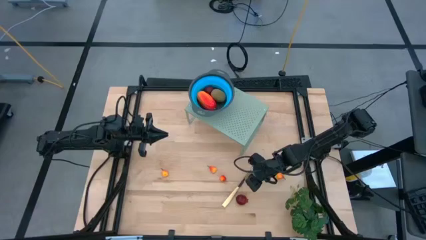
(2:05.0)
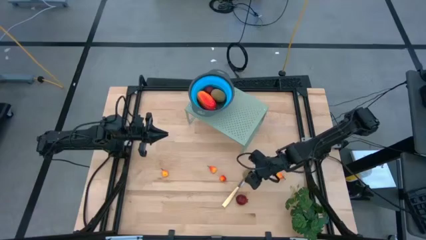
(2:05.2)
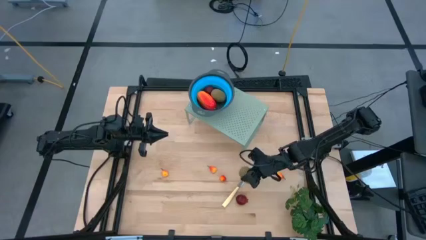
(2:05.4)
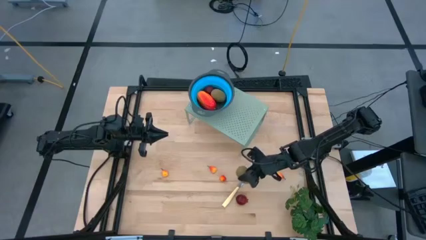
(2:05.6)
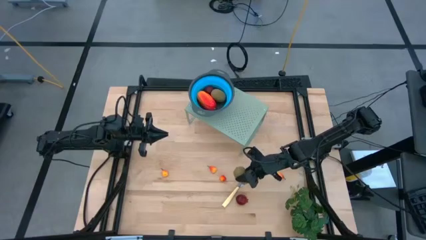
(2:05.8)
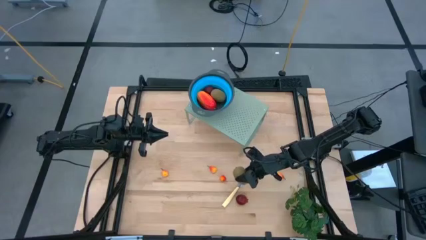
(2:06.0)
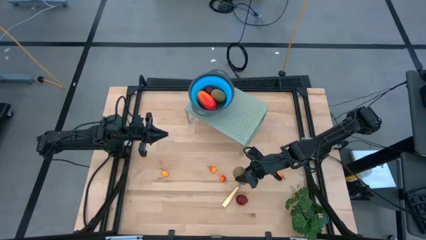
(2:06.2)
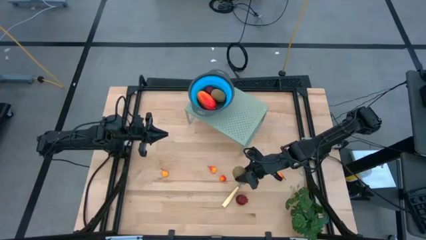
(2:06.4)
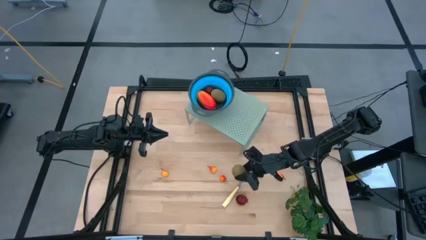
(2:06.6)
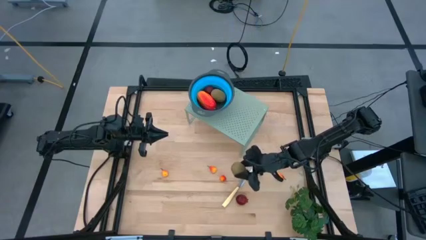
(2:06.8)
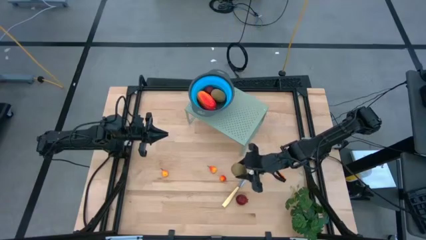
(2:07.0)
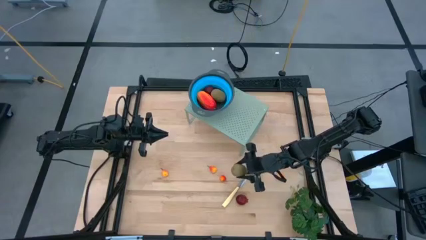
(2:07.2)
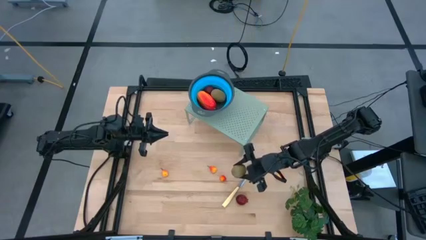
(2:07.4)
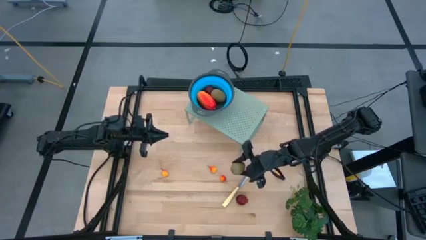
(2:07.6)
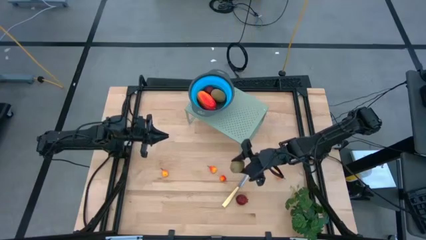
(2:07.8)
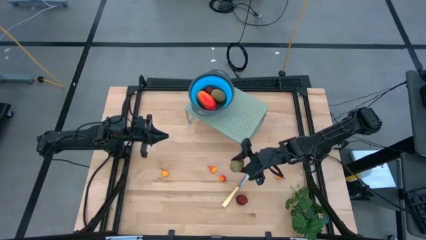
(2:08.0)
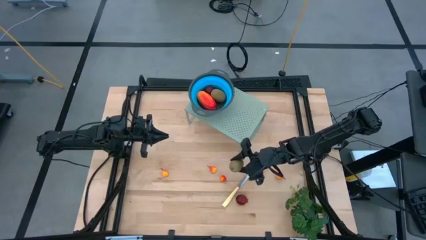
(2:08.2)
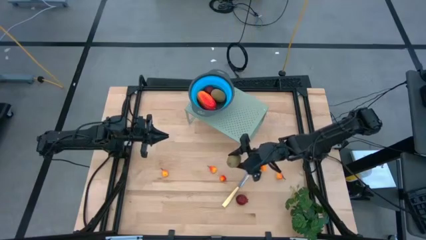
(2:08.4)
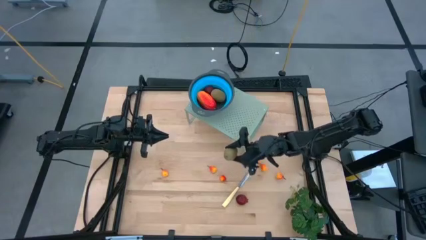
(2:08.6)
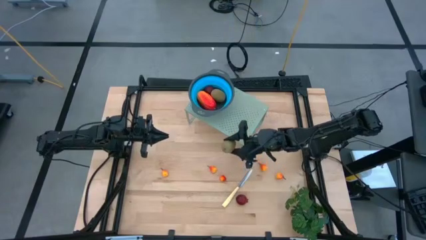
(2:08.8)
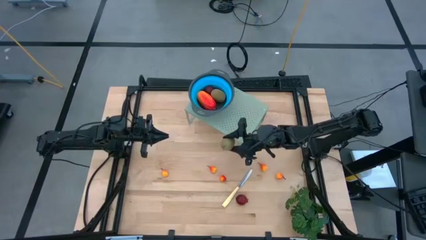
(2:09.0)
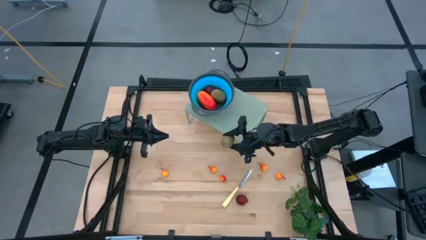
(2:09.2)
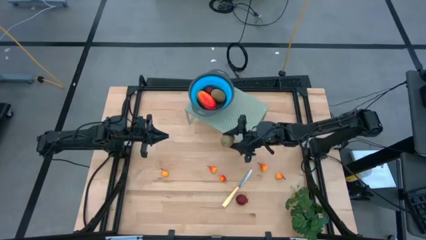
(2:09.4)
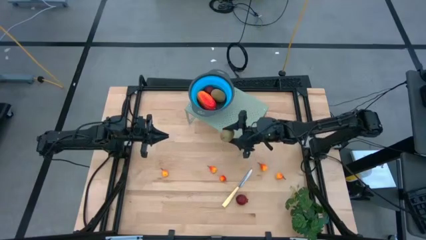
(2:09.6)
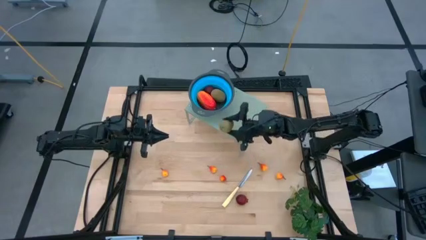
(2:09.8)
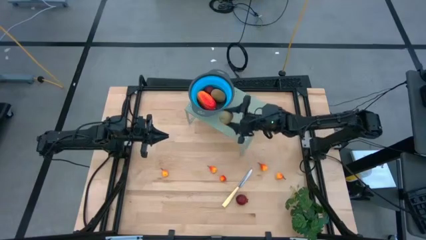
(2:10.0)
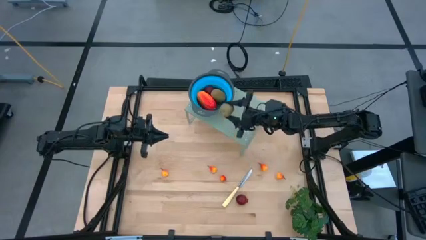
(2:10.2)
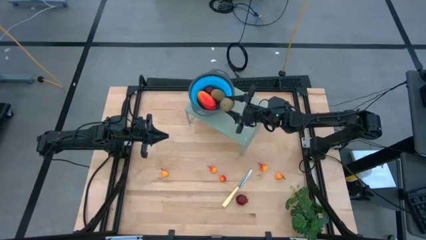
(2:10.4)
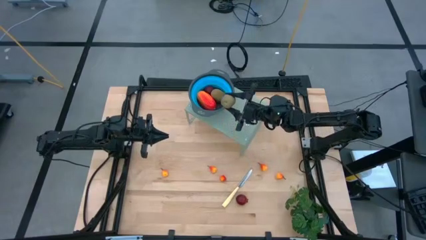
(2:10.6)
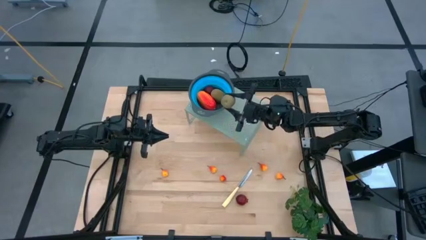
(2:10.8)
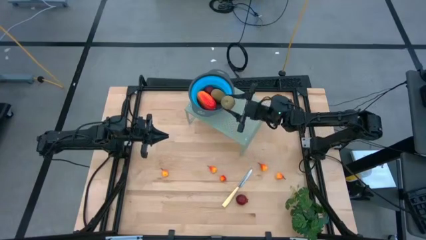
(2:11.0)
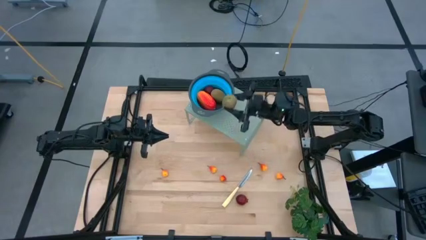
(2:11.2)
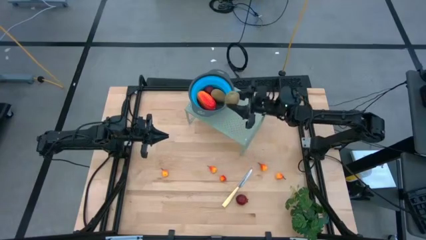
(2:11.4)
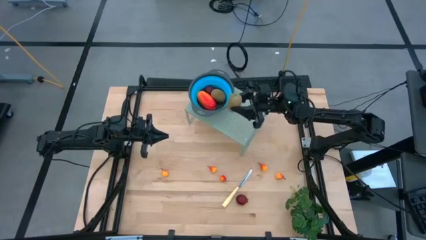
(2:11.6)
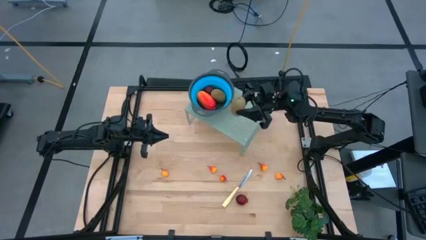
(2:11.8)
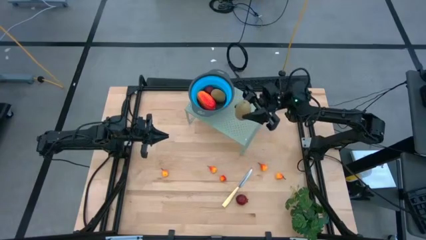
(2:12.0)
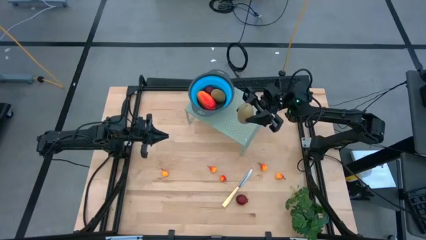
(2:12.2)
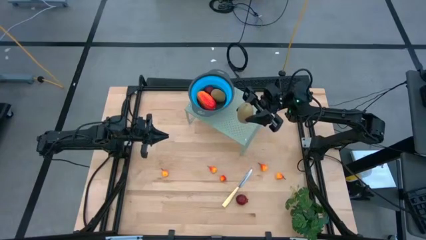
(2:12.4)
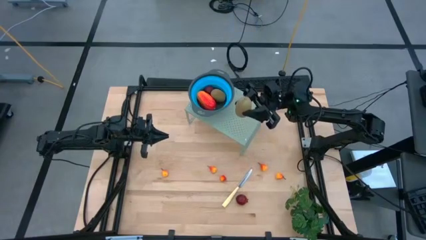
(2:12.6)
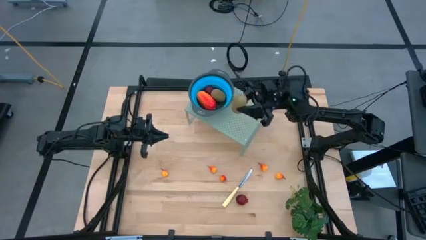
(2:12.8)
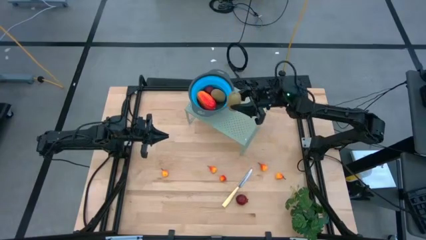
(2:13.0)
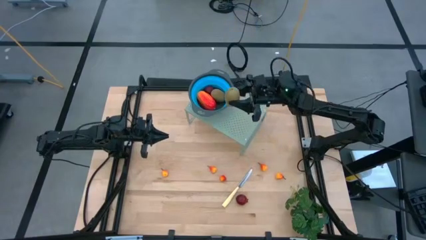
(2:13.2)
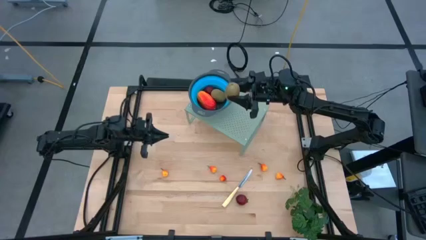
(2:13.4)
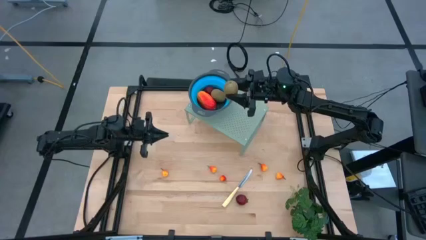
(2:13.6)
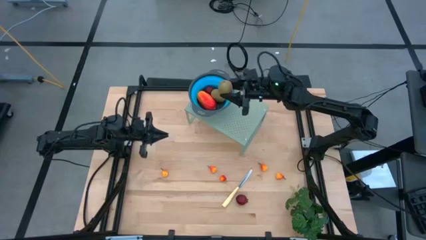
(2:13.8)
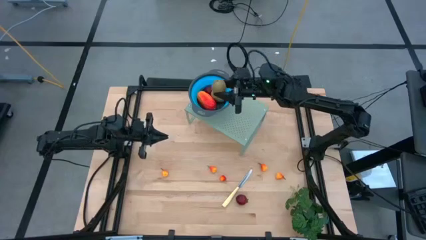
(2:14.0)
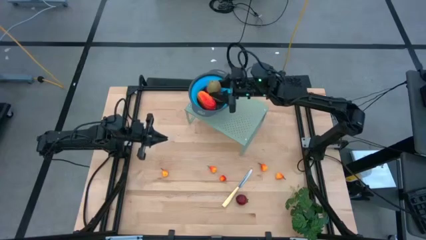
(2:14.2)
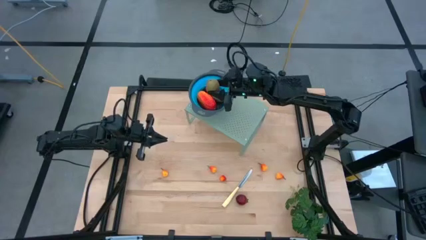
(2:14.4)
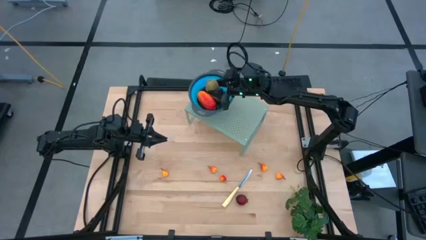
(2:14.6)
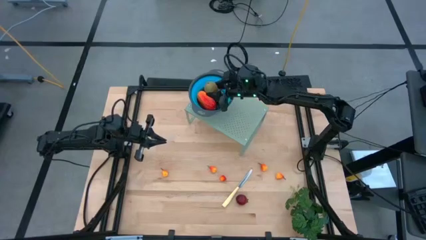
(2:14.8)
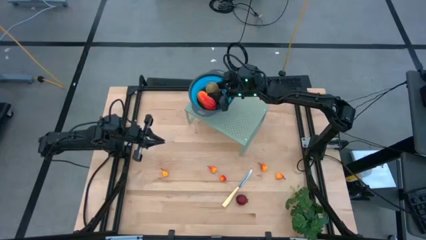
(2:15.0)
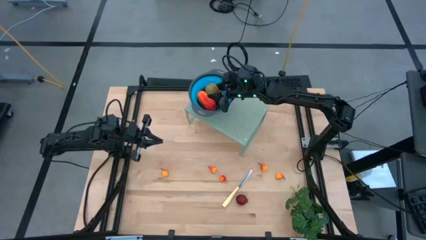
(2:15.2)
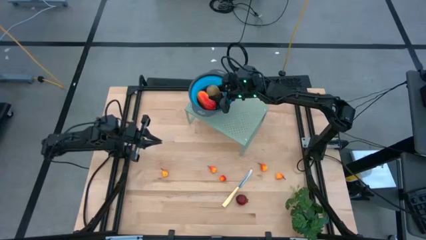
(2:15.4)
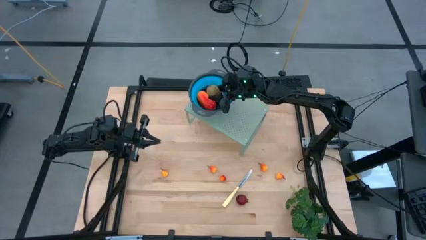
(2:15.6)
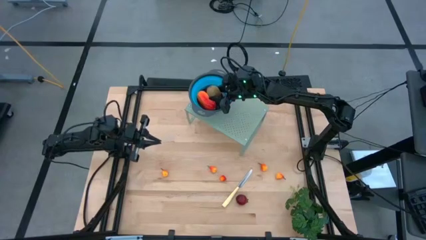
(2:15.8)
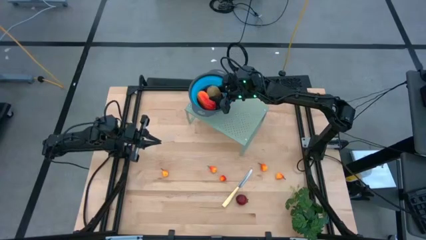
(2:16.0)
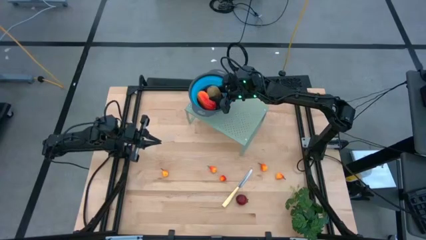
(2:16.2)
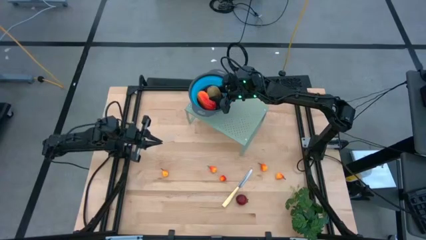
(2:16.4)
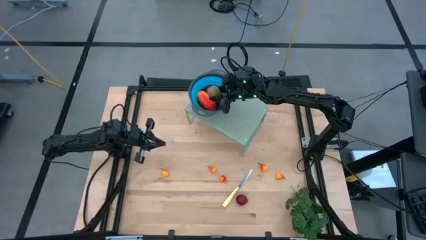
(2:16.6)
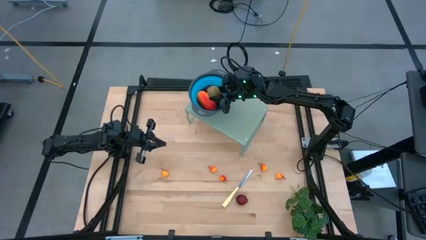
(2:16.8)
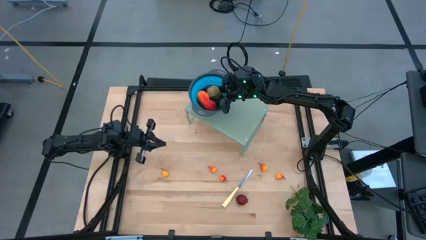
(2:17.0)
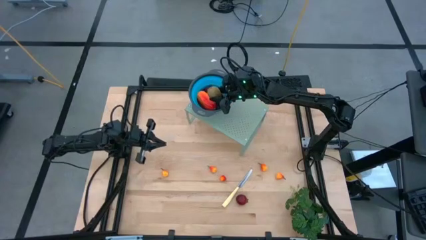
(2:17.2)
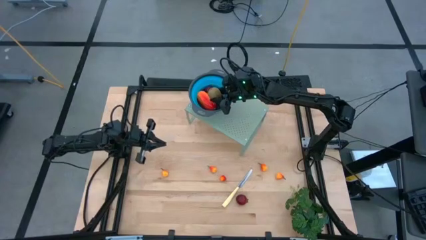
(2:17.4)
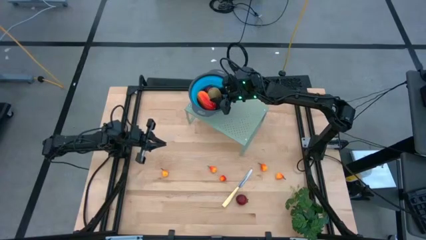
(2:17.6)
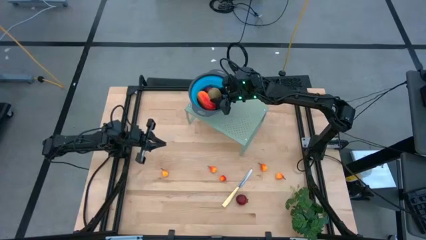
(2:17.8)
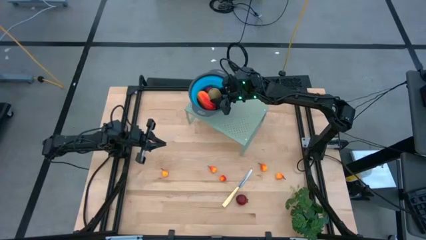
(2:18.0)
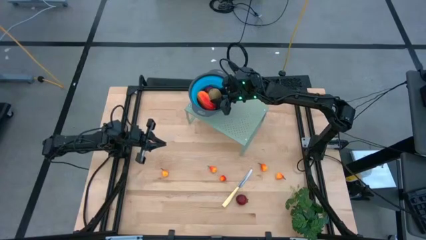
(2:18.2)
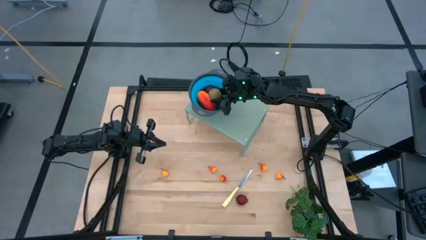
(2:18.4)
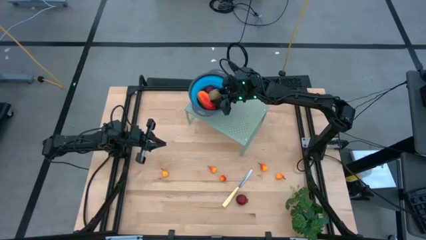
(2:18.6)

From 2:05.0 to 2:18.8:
Task: Pick & Place Fruit
Put the kiwi into the blue strainer bowl on the shelf
